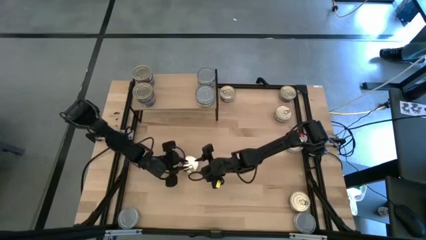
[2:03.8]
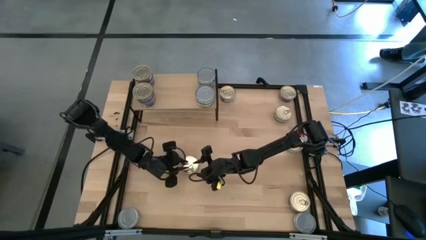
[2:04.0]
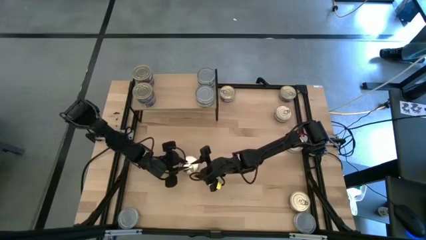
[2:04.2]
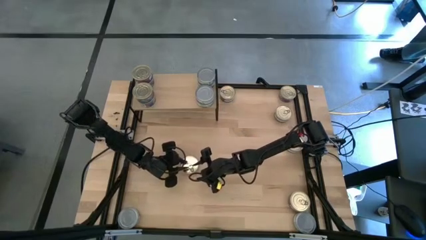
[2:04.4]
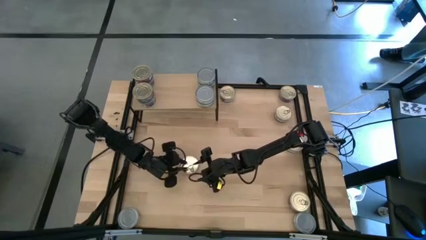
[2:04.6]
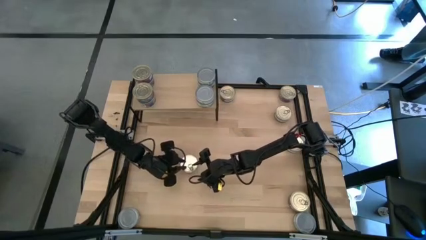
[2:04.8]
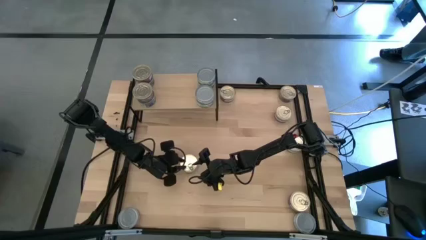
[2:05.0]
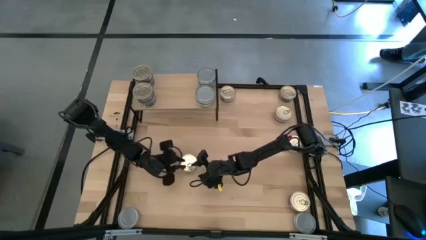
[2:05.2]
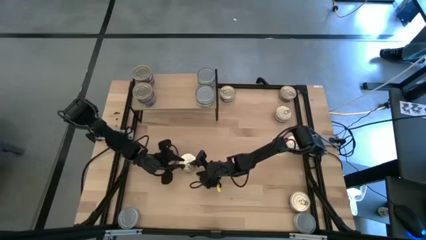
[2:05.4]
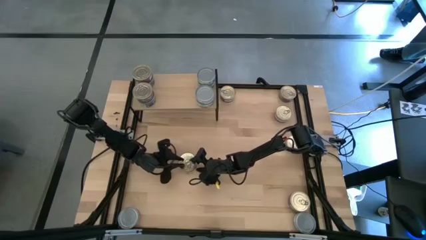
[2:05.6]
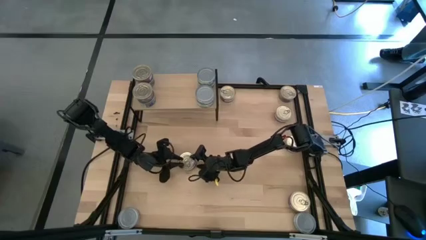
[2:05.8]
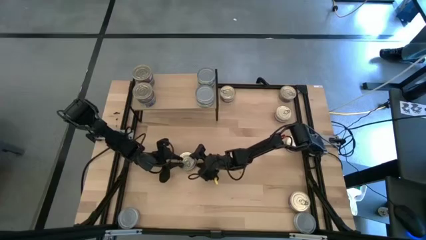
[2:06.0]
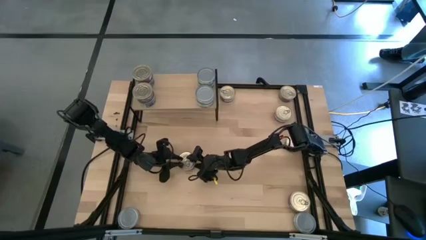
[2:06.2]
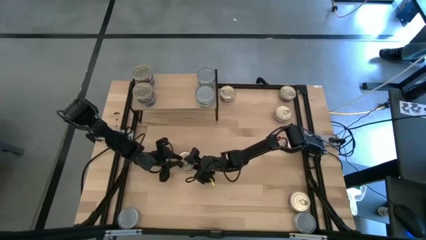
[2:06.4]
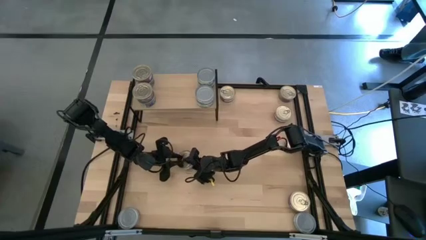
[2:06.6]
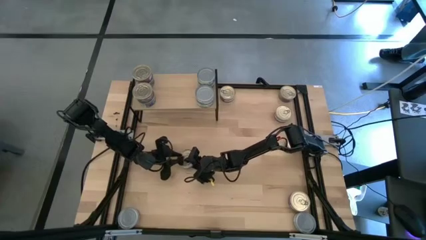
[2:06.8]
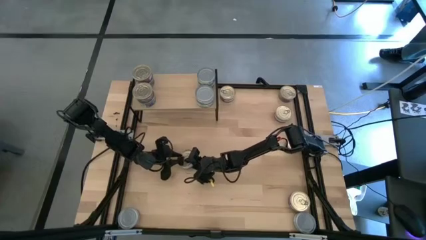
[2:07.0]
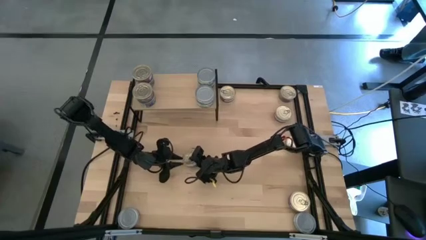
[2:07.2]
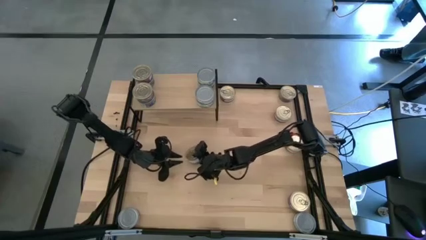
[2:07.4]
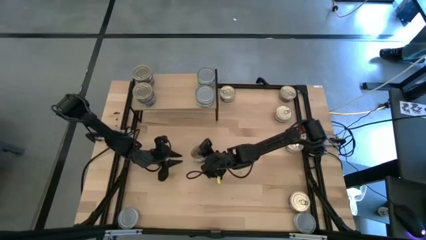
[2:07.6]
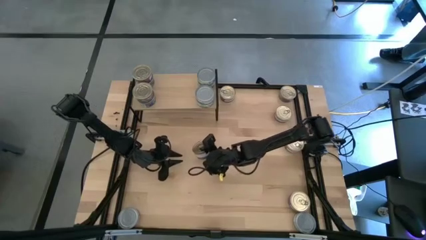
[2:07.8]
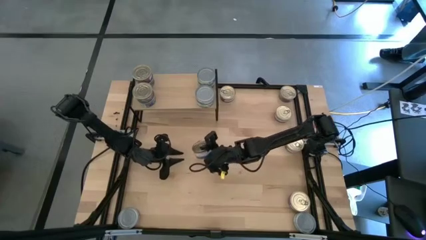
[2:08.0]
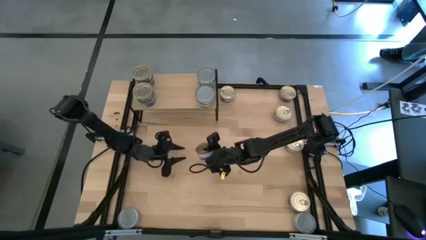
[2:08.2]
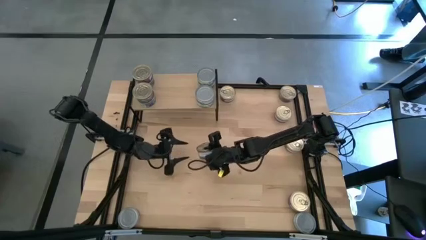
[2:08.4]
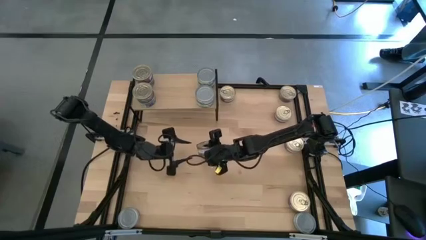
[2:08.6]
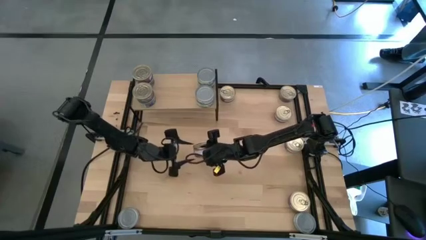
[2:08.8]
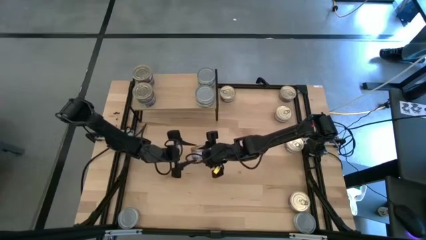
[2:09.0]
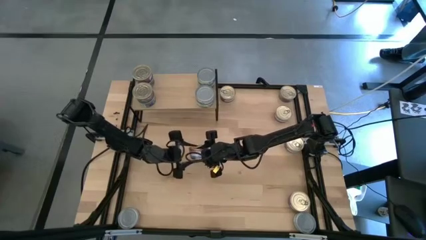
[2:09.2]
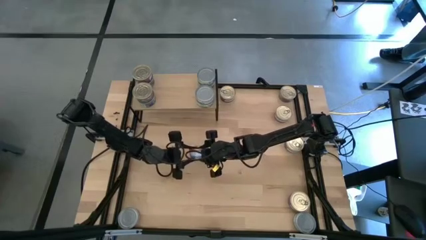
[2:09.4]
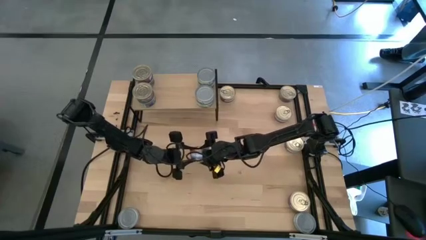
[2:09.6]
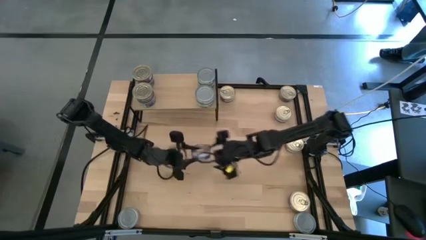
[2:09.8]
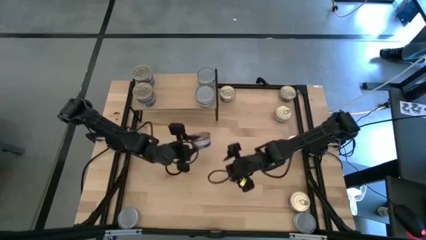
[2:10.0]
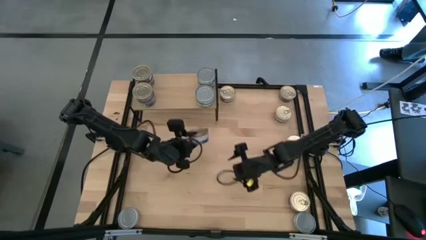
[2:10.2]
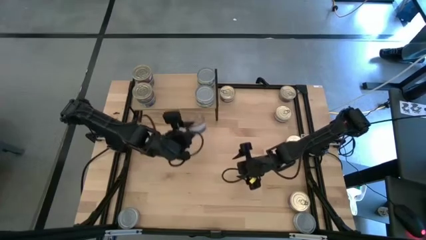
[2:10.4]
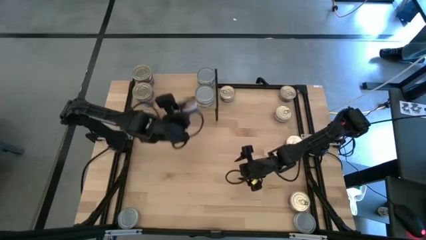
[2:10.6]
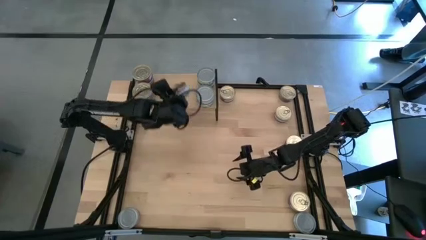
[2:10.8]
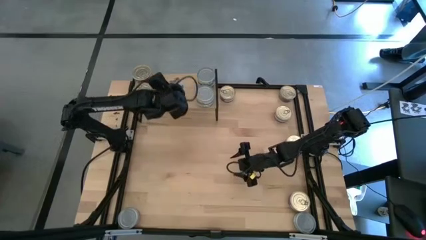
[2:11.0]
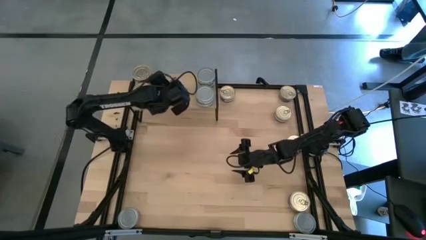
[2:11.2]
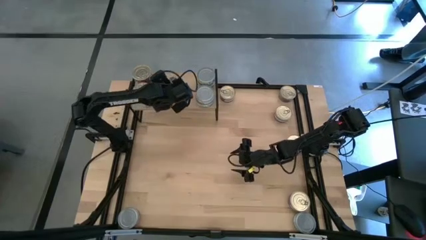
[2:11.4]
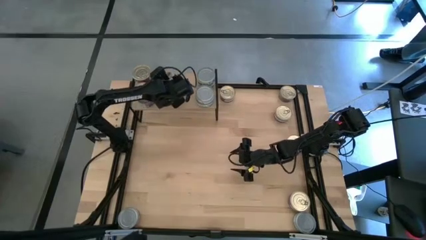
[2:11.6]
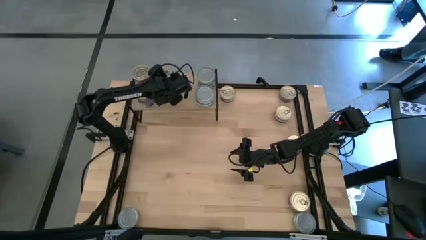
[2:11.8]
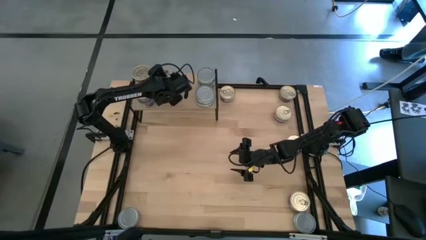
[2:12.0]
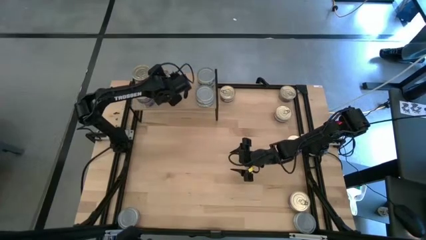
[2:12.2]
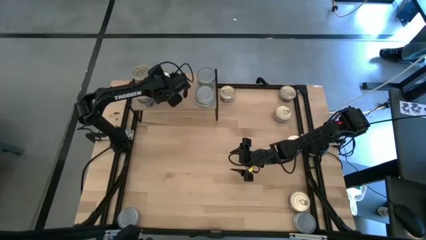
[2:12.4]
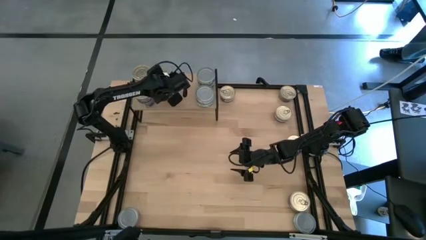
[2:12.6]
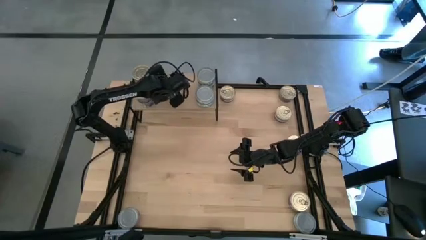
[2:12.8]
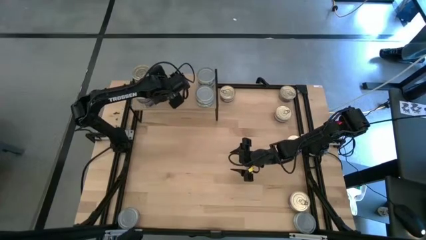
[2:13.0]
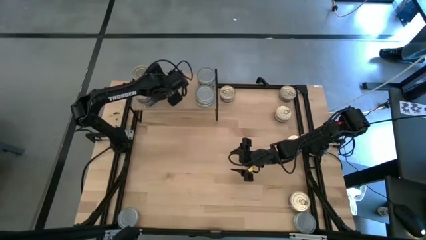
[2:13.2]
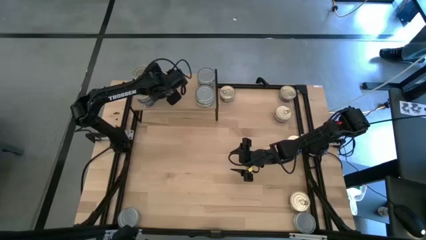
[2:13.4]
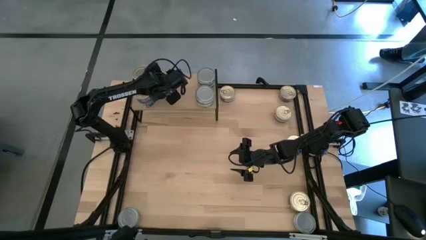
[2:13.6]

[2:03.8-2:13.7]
Task: Stack canned seafood by type on shelf
Put the blue tuna can on the shelf

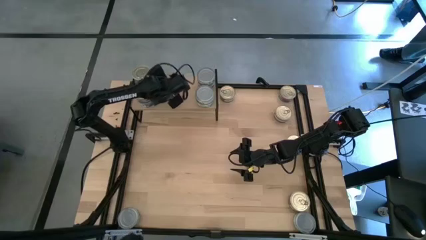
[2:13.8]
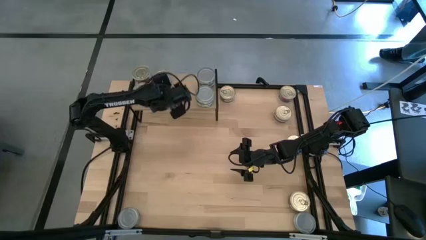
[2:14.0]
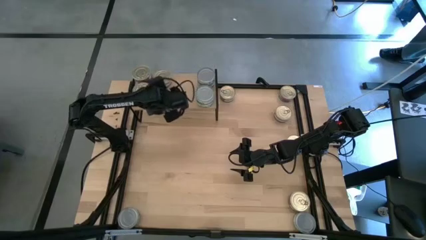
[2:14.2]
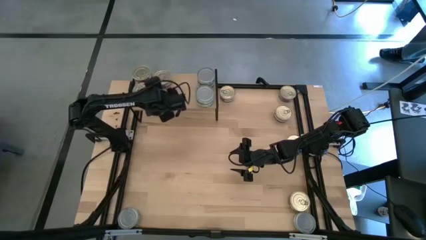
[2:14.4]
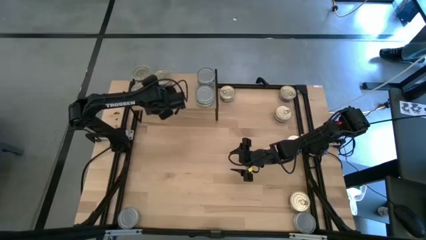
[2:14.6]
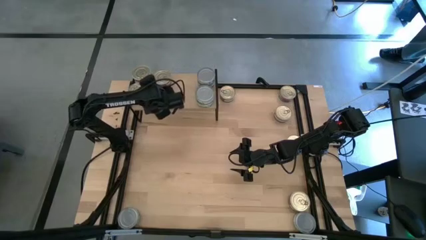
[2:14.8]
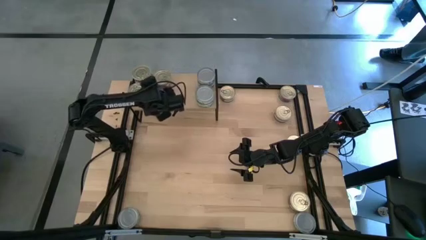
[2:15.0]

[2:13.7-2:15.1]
Adjust the blue tuna cans
